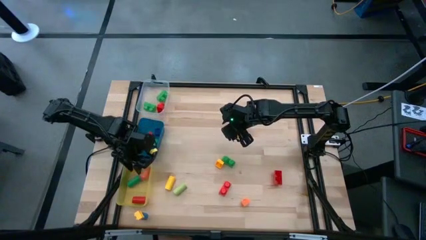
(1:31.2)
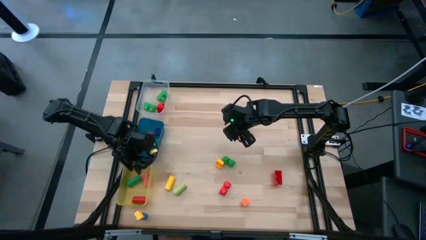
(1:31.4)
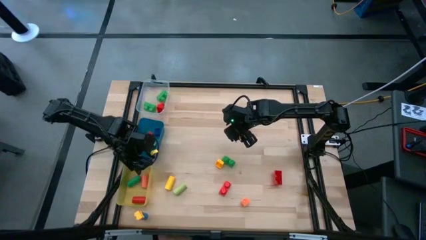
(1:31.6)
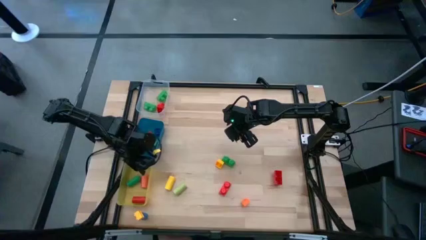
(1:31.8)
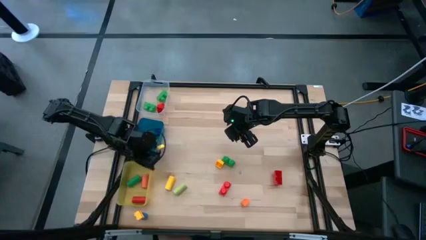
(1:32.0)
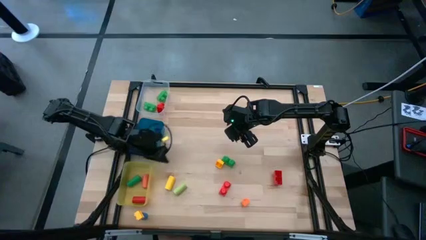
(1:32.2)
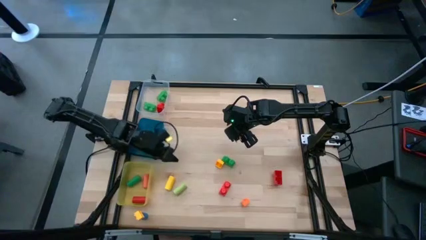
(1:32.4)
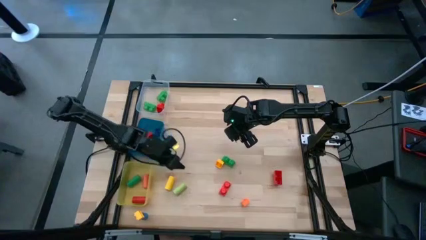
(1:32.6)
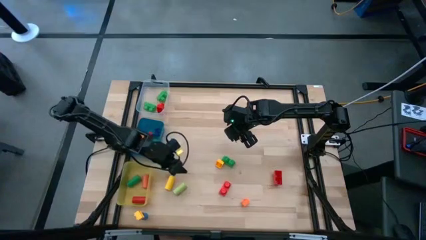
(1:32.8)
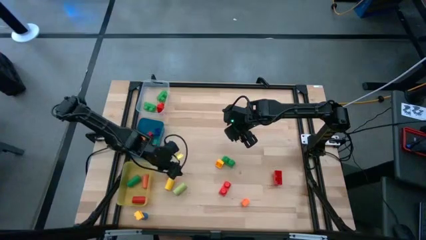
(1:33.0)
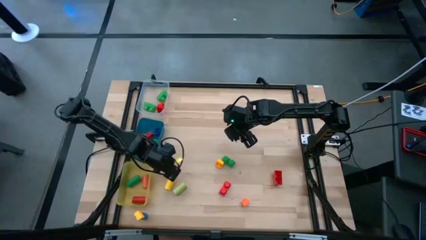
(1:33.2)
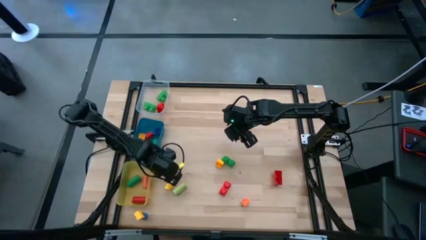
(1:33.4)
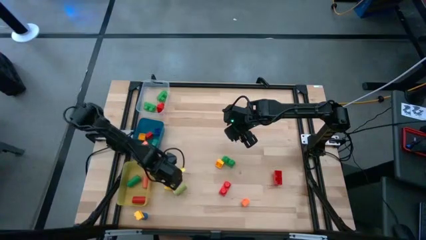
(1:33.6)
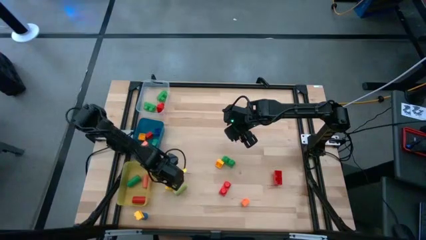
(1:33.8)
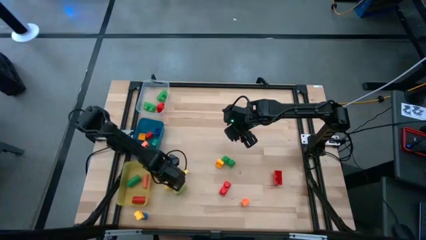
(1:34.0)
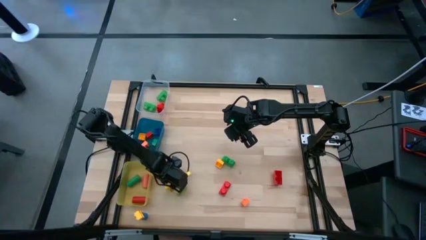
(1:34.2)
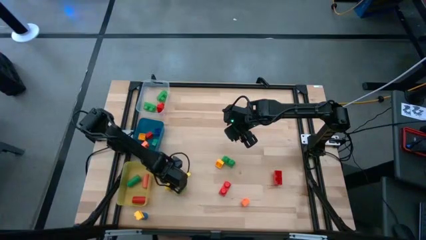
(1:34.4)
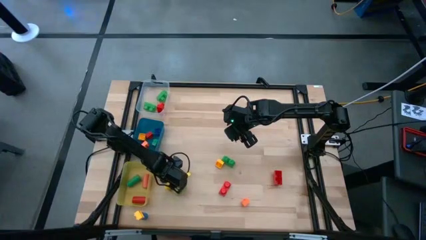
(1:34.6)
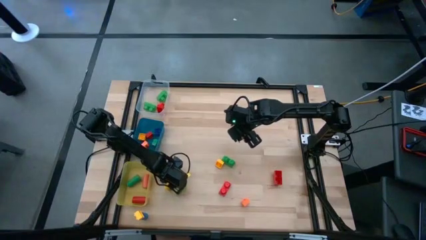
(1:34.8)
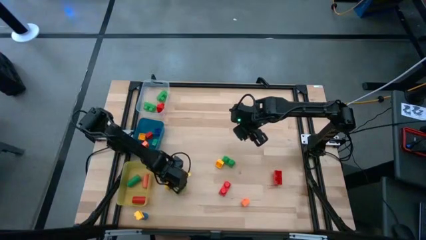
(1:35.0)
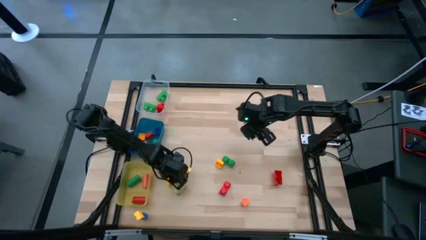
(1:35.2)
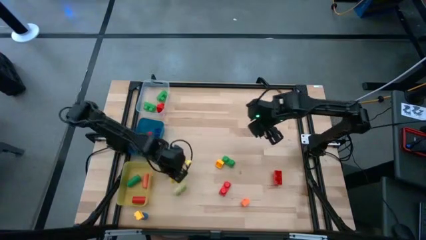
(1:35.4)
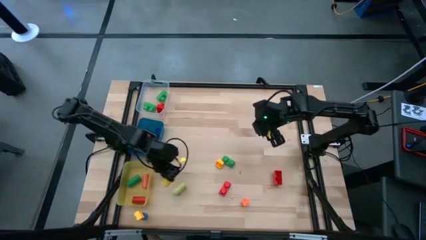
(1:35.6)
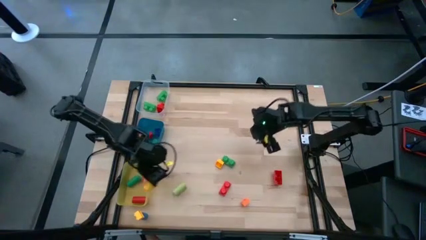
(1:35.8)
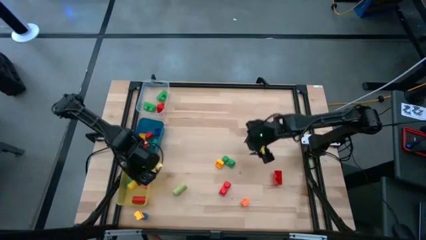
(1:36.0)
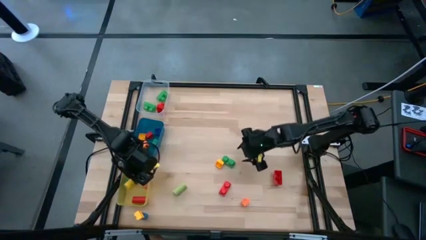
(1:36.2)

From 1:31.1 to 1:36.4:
Task: Sort blocks by size
Put the yellow cylindrical block into the yellow bin

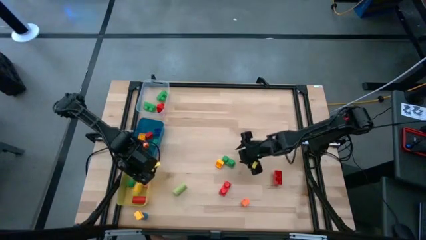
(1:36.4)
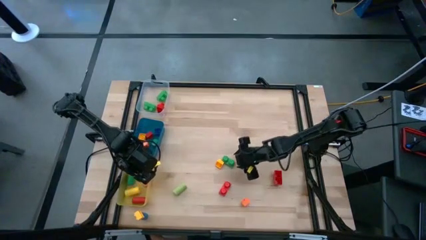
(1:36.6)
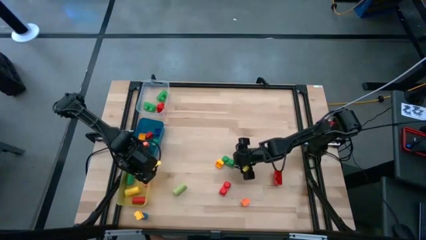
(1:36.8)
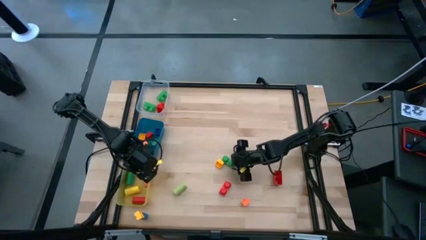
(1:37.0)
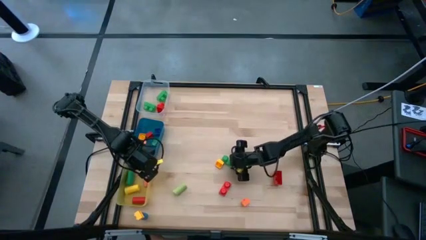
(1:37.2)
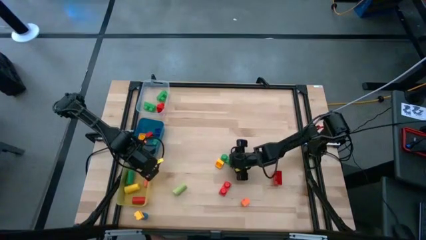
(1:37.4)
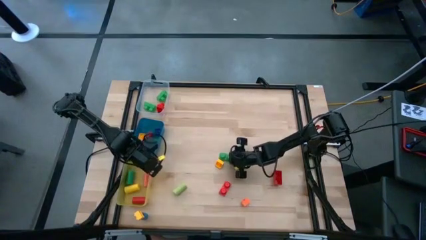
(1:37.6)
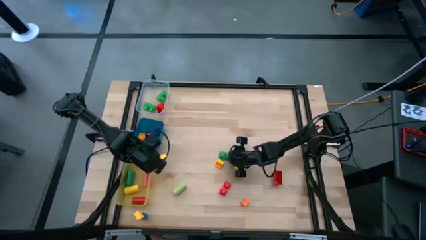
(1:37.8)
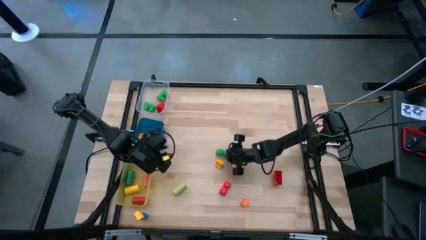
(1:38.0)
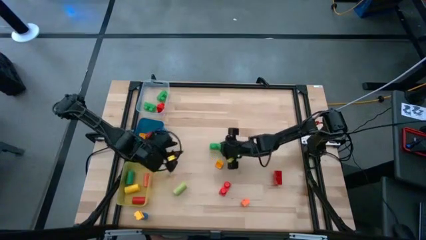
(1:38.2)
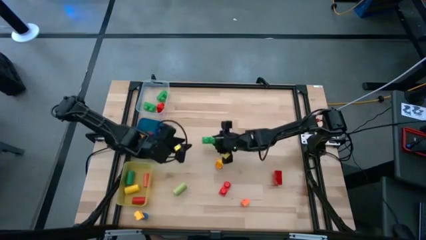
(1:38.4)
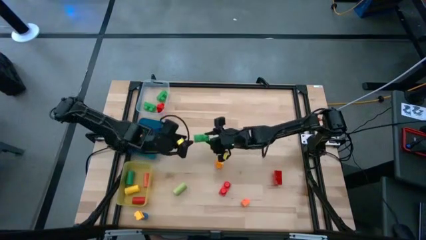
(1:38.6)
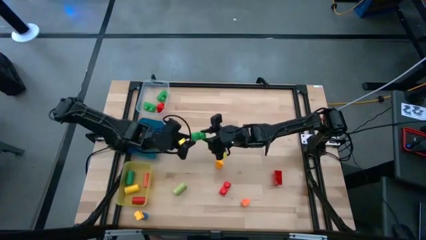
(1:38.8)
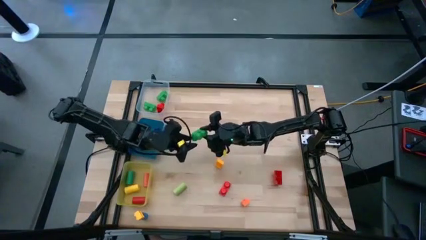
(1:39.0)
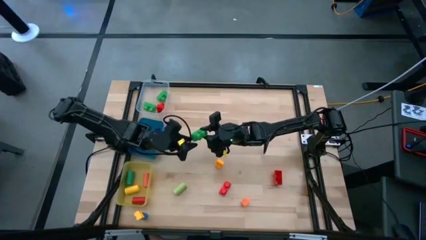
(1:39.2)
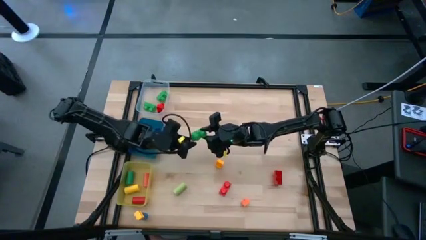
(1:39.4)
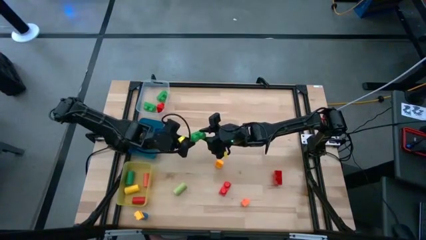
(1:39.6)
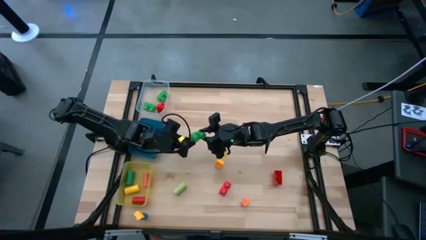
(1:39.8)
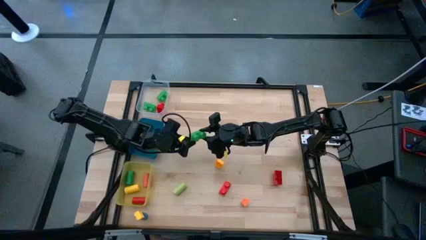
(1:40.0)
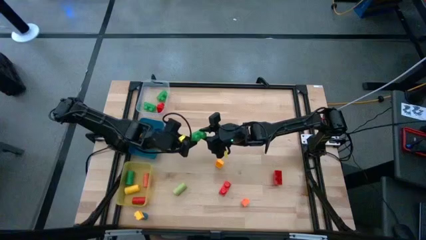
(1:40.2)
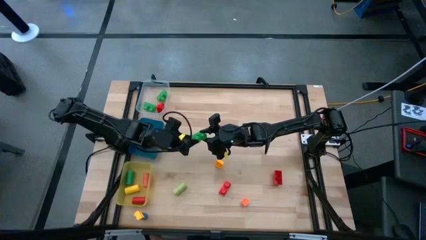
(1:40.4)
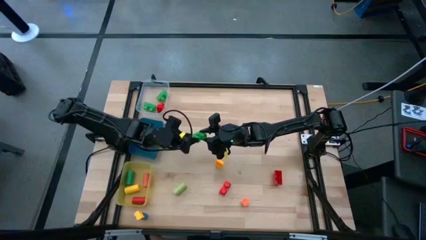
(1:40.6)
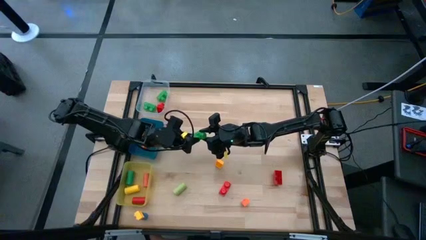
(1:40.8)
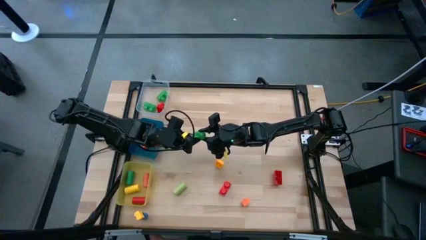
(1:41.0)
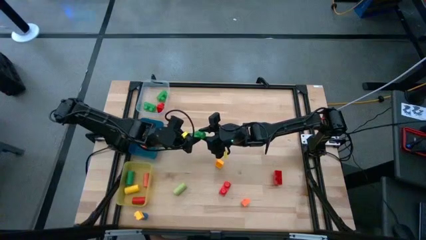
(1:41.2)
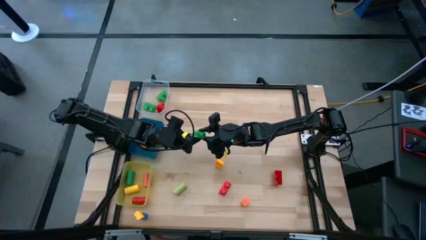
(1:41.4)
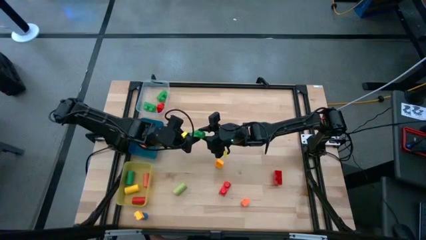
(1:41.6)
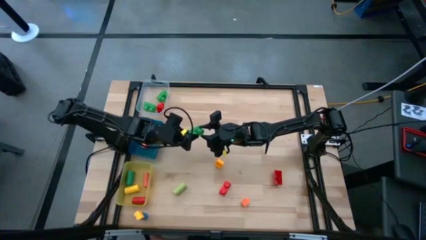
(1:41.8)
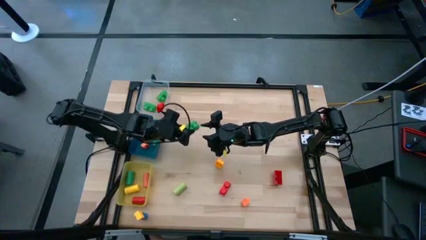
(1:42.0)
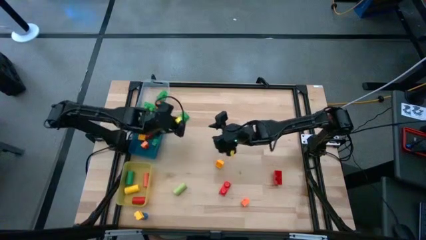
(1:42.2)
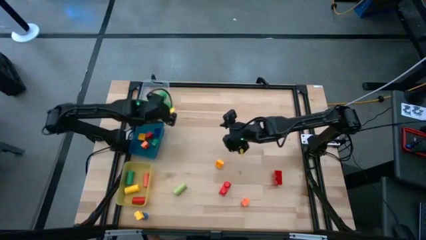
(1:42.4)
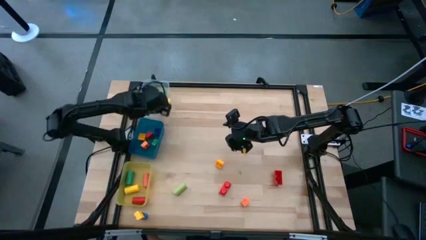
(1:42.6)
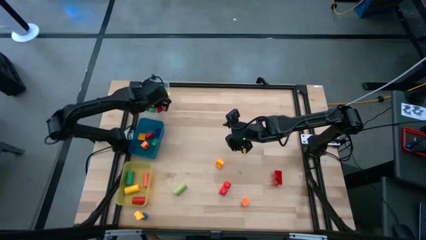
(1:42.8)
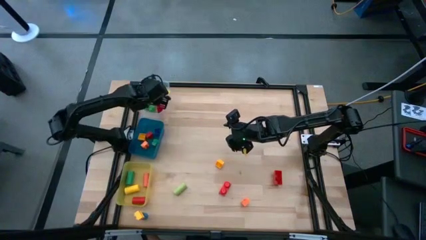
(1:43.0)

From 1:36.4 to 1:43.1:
Put the green 2 stud game piece into the transparent bin

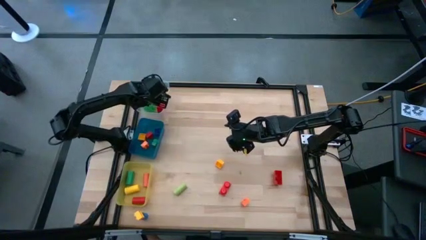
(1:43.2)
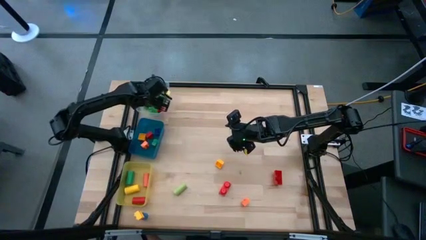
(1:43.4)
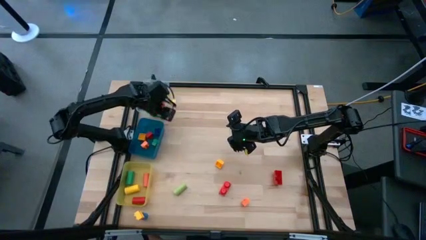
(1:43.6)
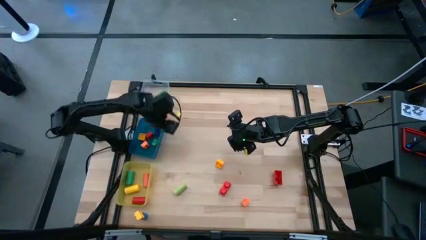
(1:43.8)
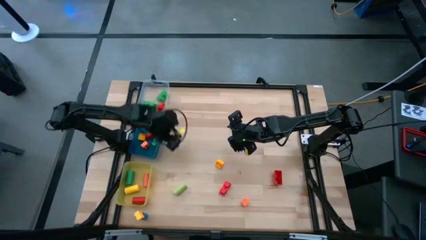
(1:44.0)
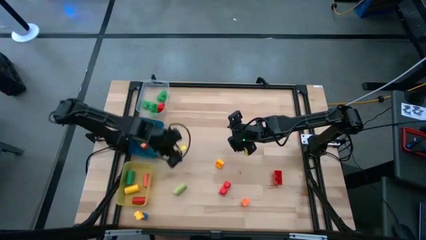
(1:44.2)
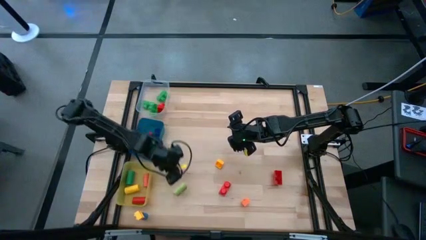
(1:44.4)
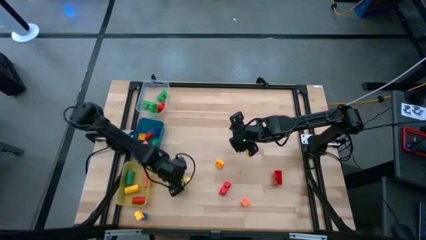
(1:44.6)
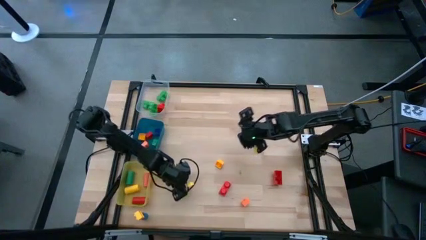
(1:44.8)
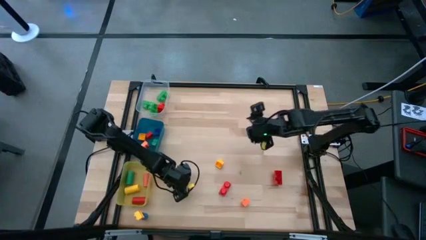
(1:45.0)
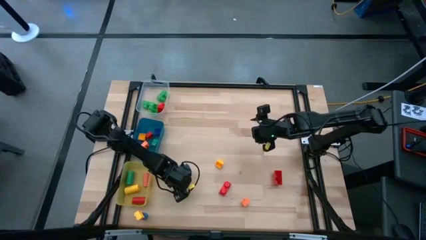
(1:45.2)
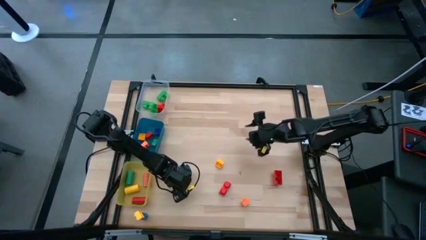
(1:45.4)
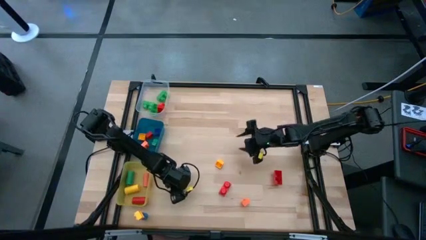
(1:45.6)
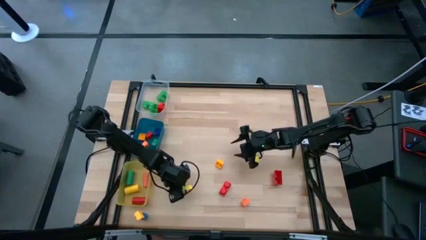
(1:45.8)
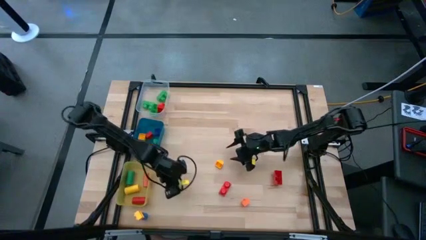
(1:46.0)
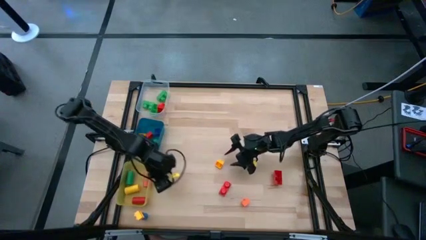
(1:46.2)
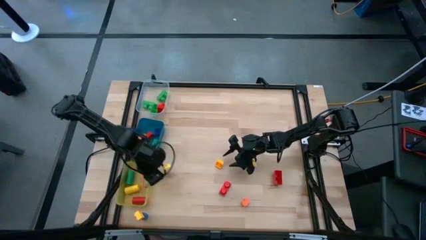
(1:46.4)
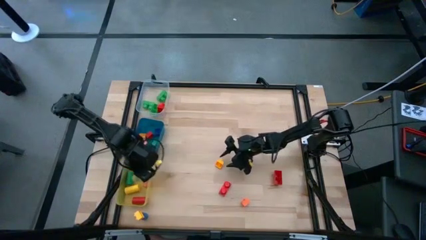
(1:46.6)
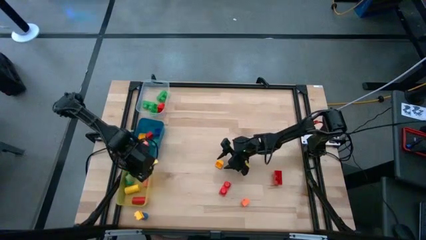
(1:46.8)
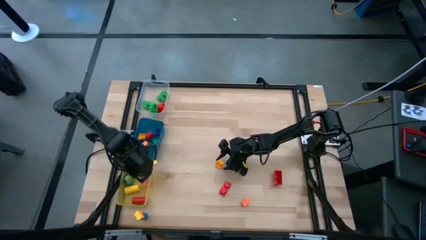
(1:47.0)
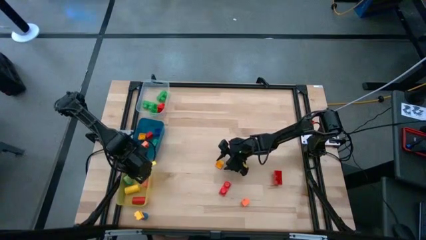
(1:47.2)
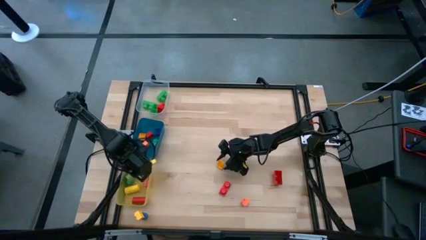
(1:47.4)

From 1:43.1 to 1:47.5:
Put the light green cylindrical block into the yellow bin

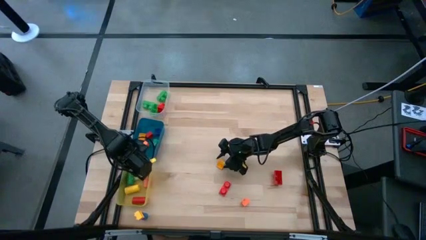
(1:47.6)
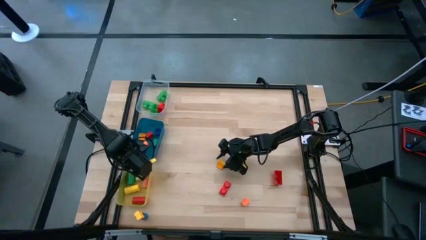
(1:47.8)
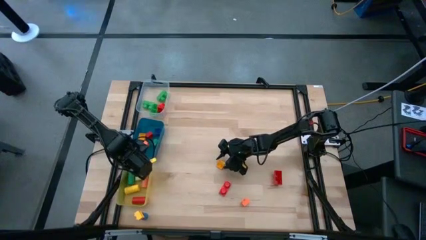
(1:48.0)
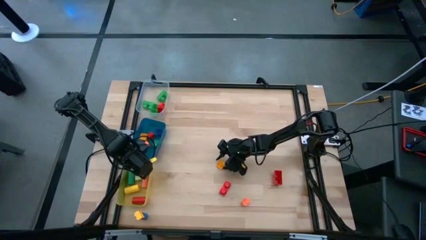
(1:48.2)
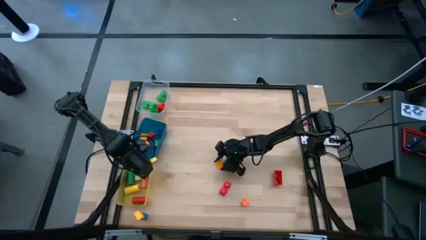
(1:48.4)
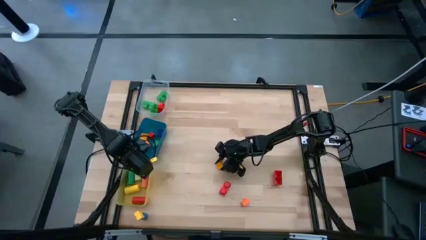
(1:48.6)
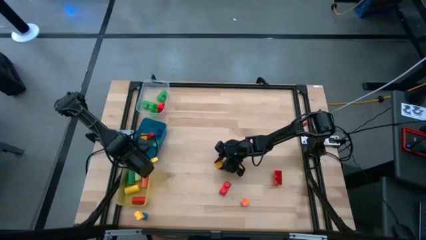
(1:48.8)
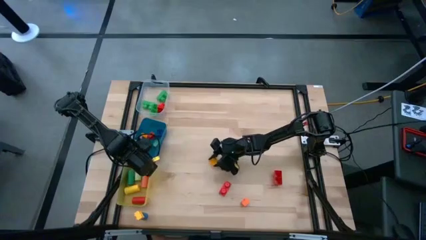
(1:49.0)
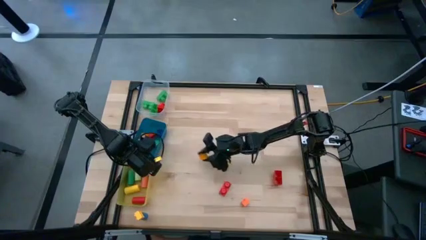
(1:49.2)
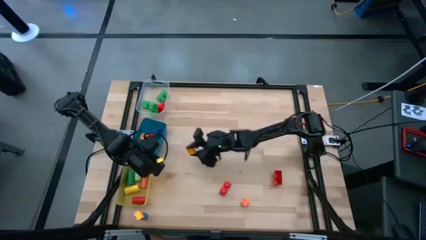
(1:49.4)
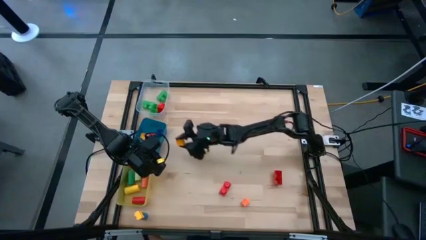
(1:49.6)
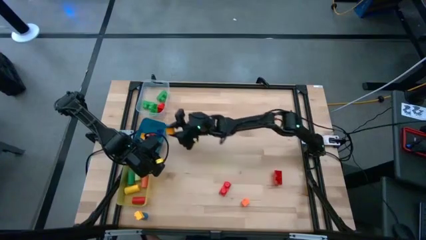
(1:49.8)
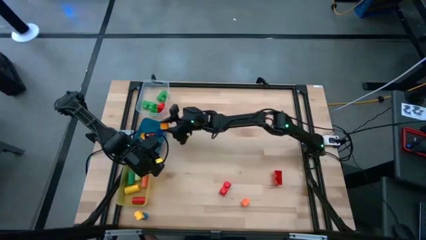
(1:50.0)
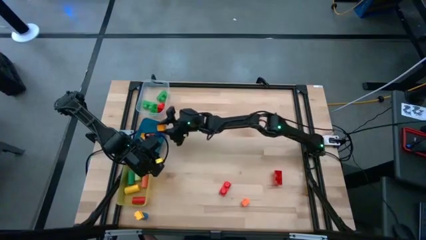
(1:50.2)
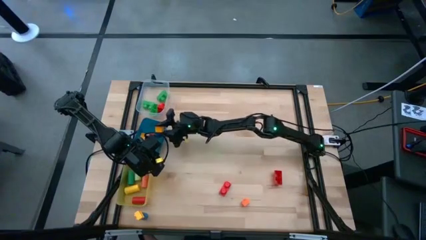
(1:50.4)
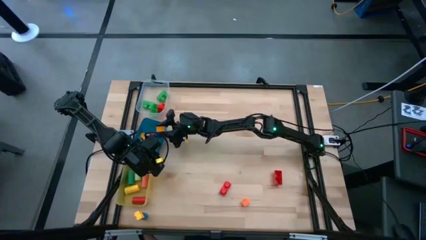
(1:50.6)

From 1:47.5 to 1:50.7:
Put the top yellow 4 stud game piece into the blue bin
